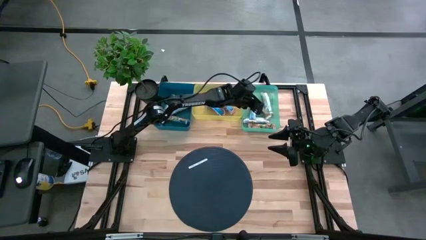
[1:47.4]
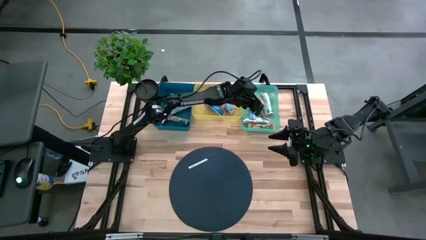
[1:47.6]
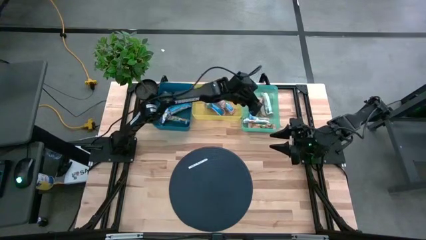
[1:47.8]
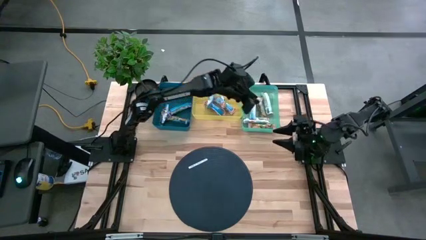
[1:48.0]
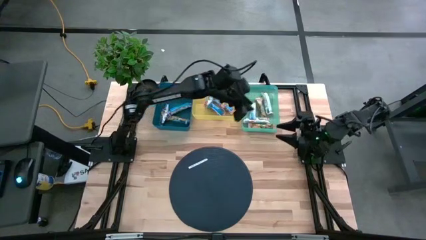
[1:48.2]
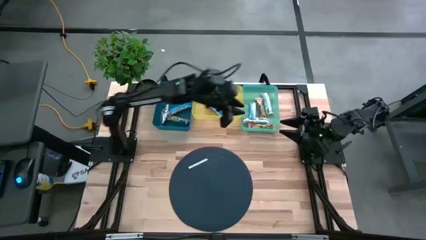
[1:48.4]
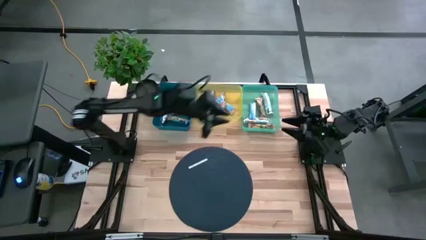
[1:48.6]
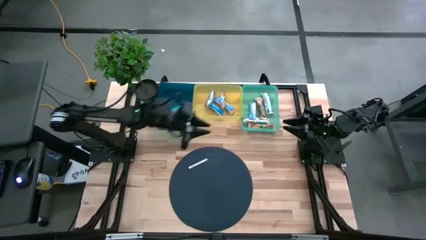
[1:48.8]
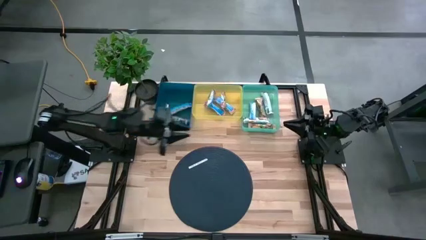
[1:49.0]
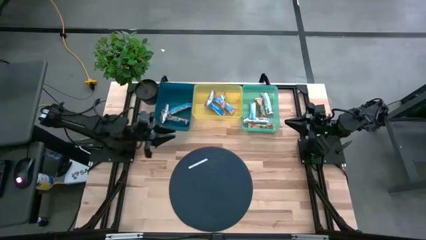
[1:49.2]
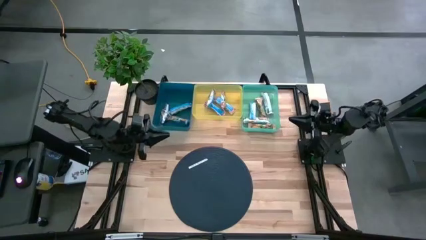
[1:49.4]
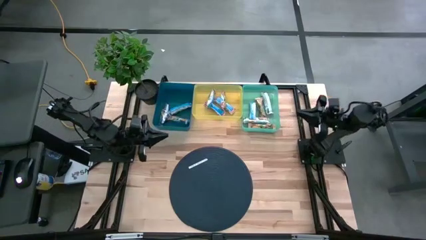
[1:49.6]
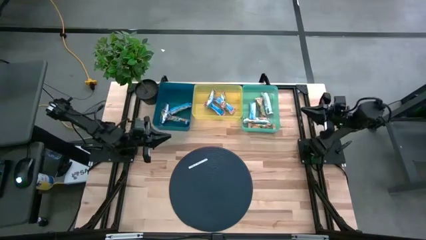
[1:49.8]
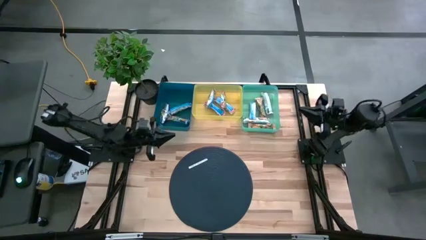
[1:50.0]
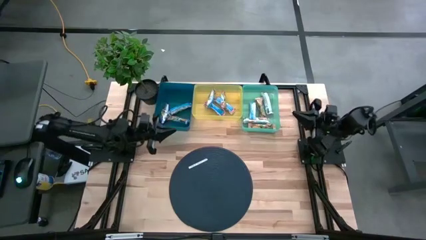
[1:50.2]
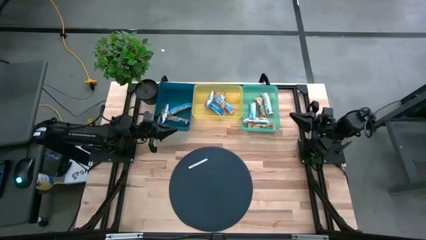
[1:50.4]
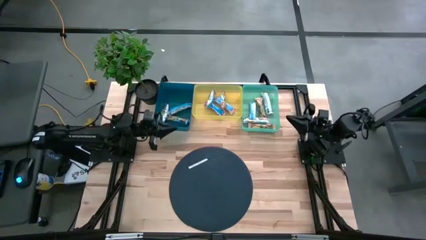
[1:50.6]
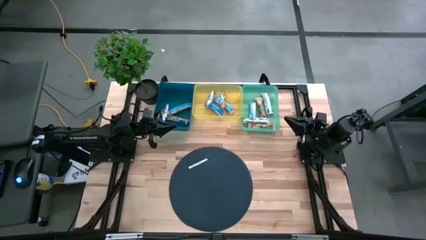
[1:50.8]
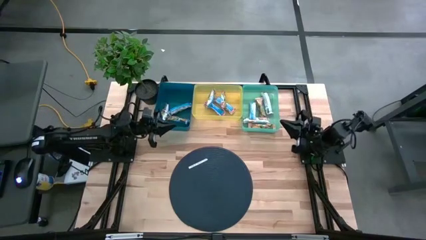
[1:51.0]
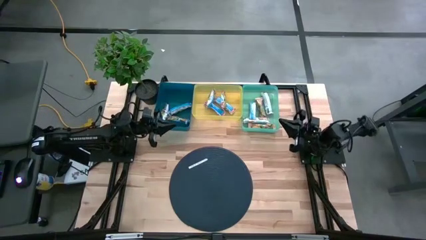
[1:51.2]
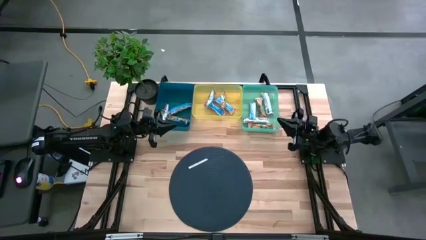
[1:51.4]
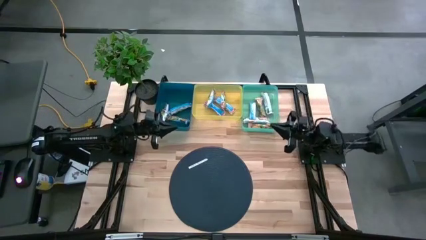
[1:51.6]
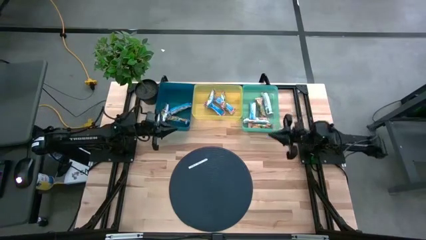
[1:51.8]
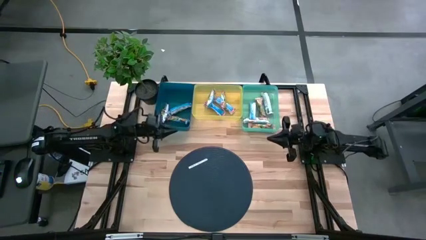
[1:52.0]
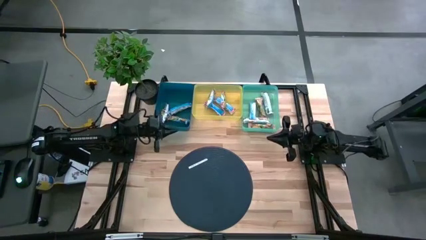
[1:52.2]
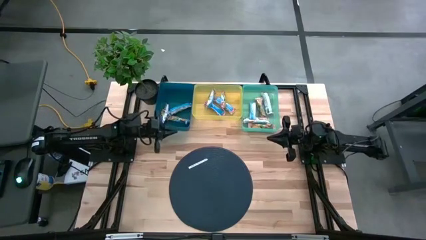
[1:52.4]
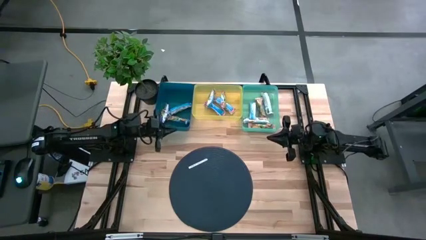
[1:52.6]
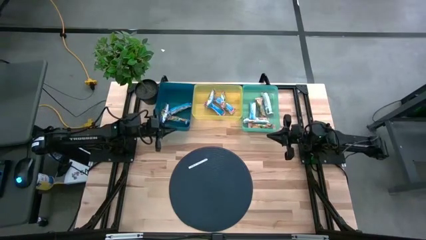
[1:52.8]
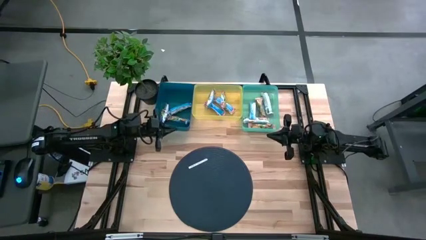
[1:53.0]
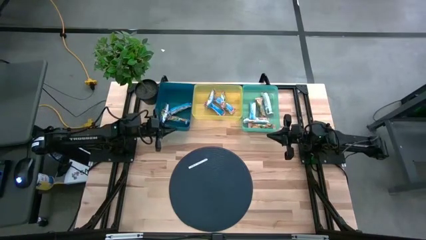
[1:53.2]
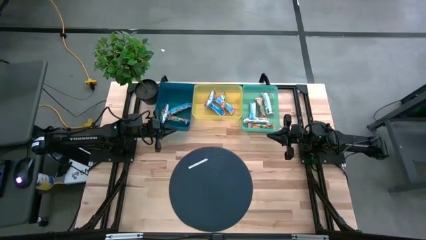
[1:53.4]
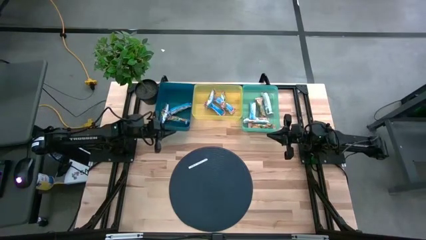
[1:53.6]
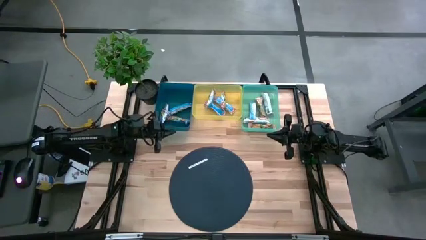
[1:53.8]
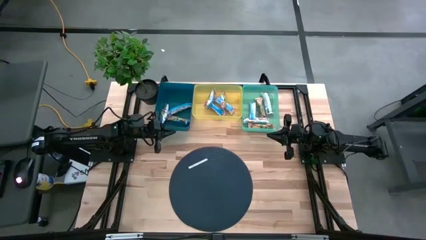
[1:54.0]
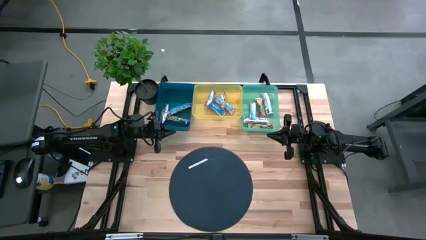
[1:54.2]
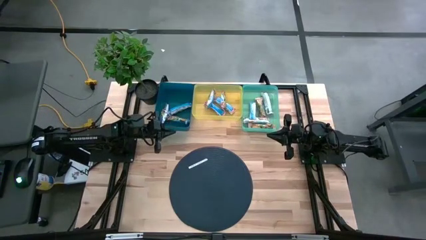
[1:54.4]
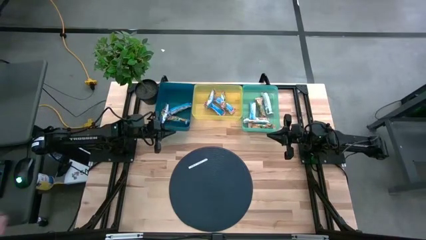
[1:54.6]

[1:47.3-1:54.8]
Task: Pick and place Granola Bars by type
Return to Home Position

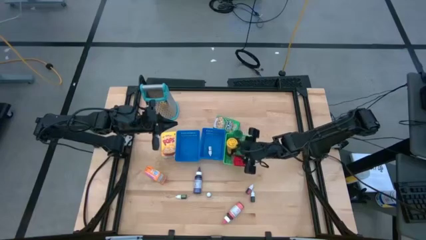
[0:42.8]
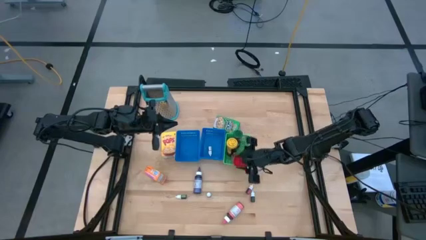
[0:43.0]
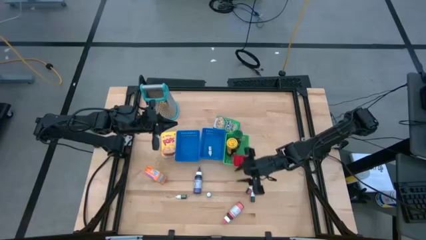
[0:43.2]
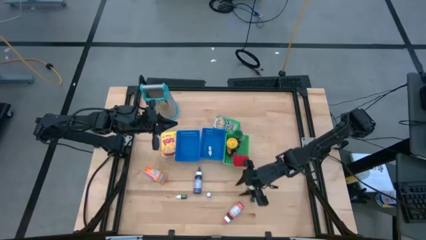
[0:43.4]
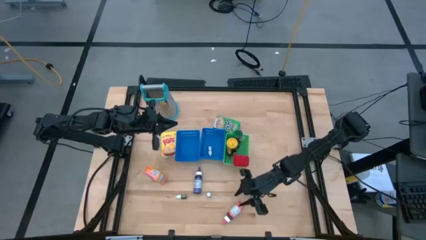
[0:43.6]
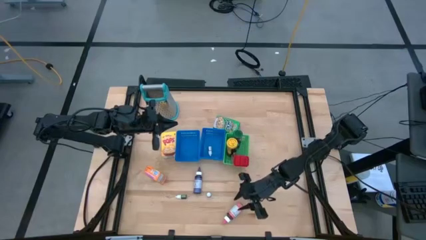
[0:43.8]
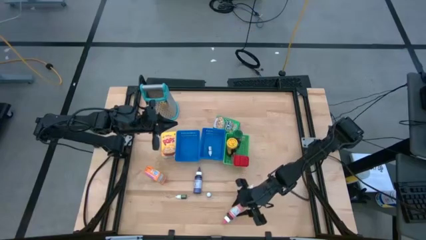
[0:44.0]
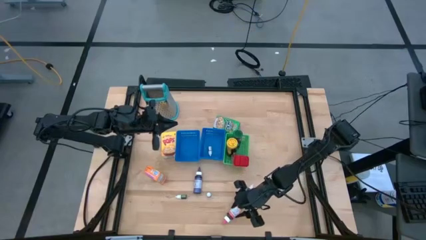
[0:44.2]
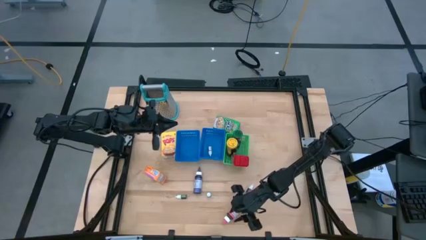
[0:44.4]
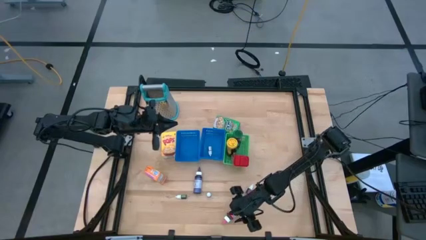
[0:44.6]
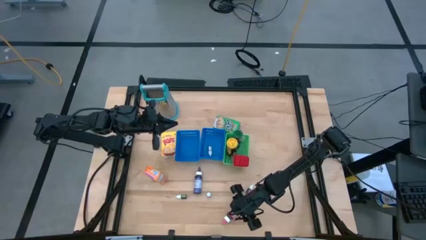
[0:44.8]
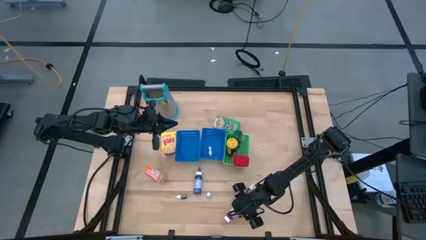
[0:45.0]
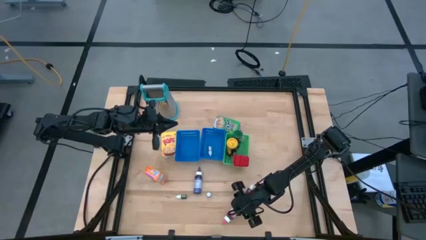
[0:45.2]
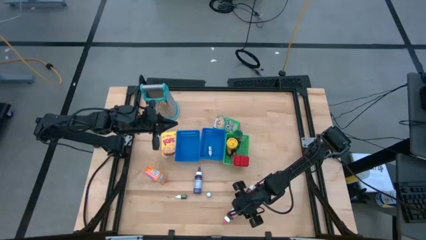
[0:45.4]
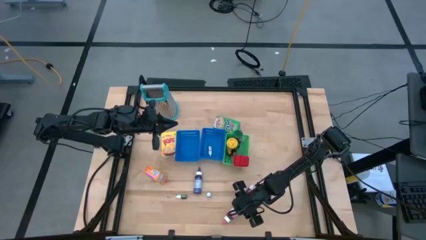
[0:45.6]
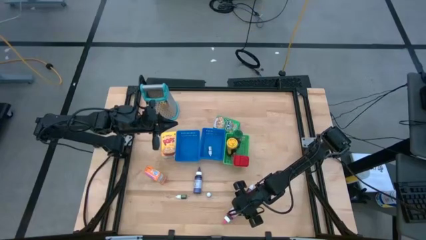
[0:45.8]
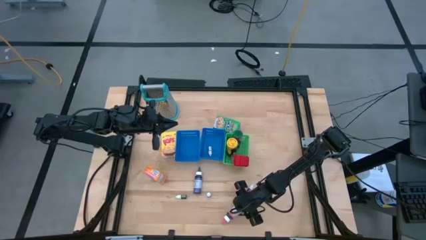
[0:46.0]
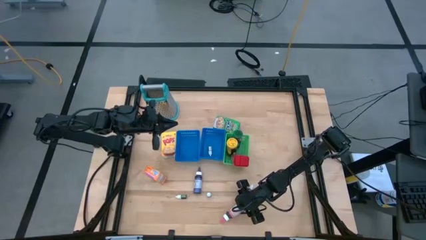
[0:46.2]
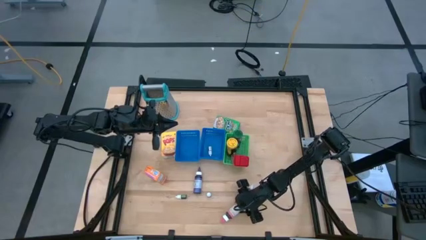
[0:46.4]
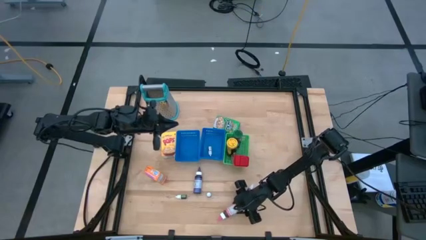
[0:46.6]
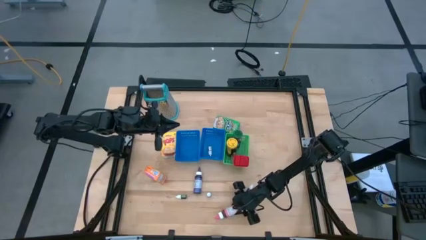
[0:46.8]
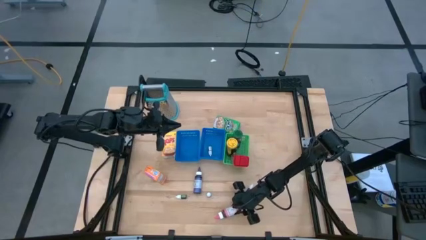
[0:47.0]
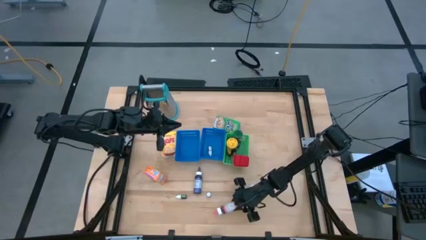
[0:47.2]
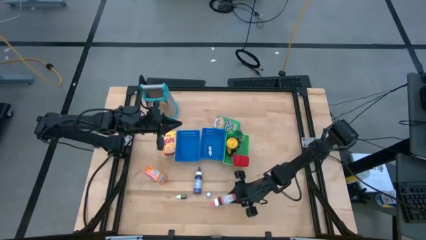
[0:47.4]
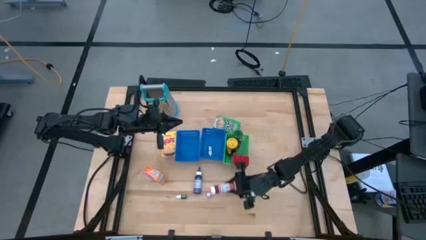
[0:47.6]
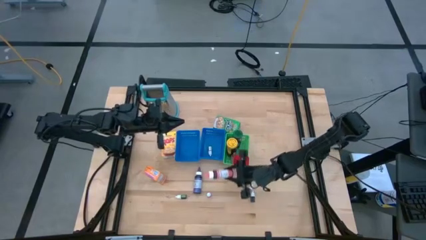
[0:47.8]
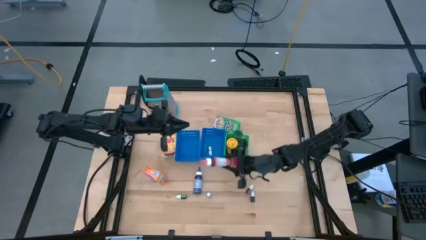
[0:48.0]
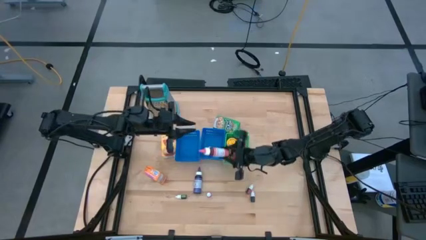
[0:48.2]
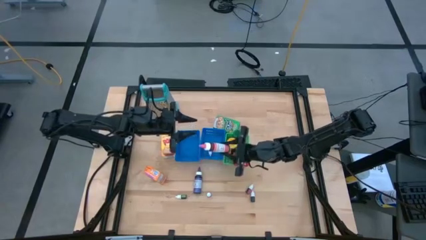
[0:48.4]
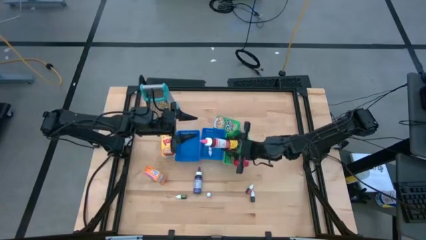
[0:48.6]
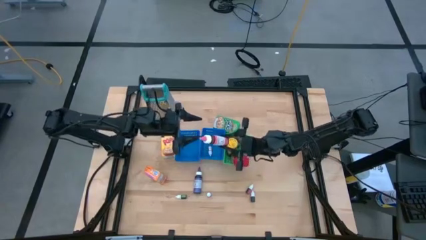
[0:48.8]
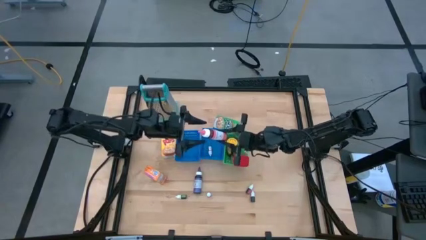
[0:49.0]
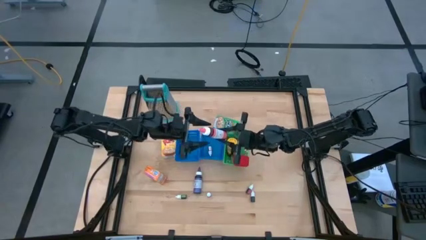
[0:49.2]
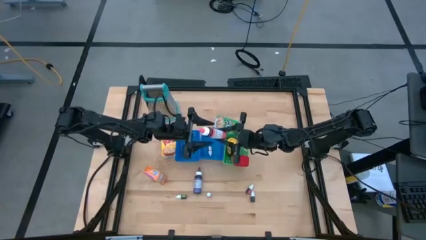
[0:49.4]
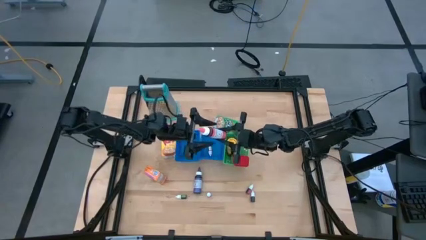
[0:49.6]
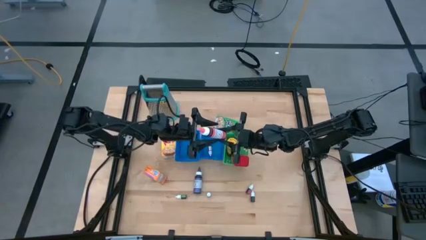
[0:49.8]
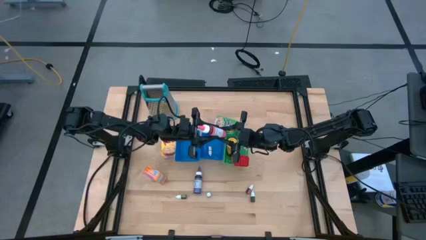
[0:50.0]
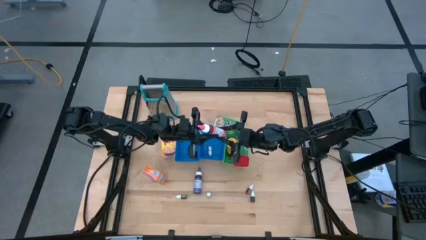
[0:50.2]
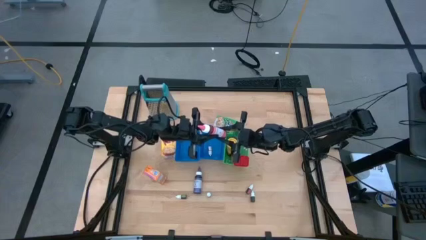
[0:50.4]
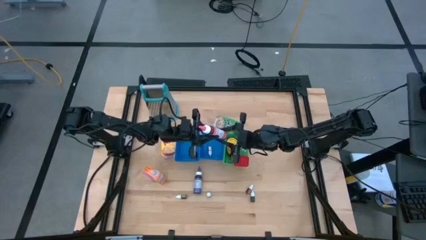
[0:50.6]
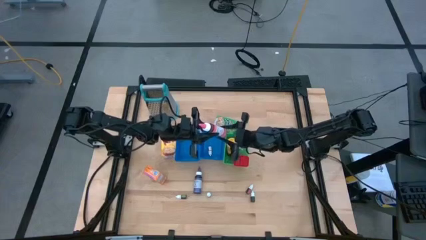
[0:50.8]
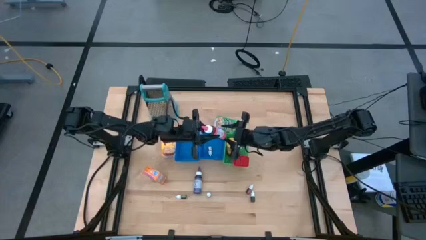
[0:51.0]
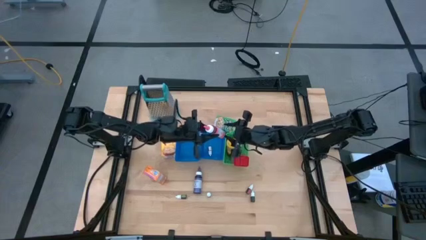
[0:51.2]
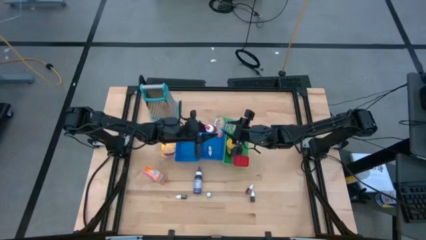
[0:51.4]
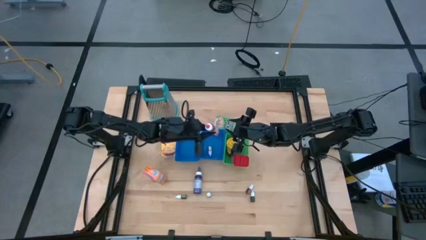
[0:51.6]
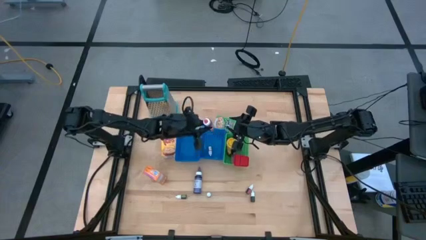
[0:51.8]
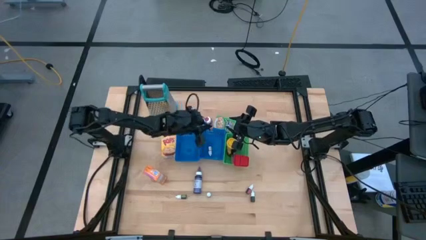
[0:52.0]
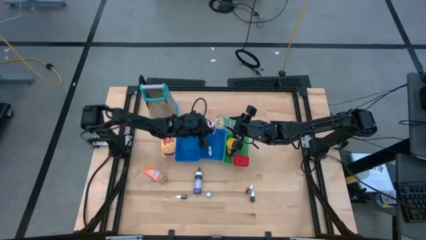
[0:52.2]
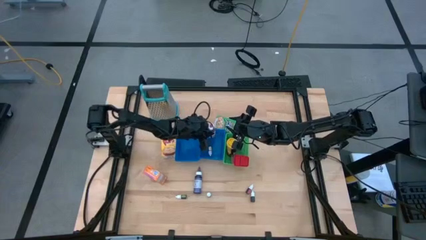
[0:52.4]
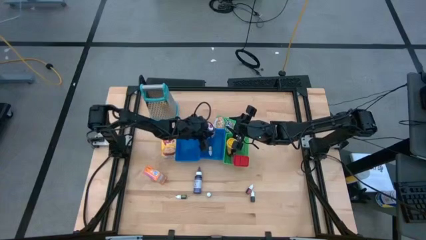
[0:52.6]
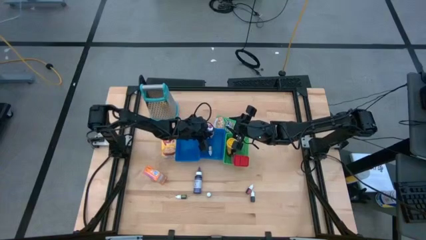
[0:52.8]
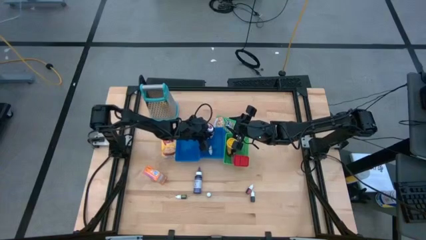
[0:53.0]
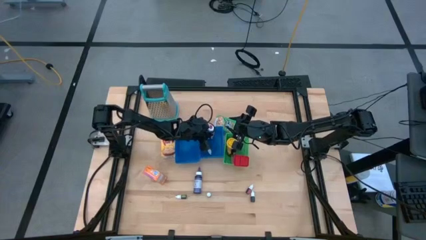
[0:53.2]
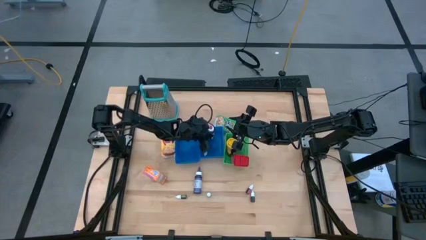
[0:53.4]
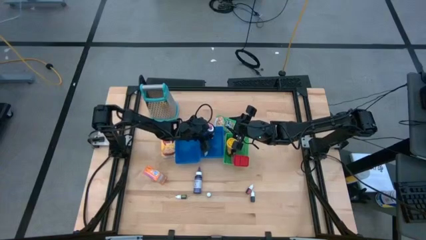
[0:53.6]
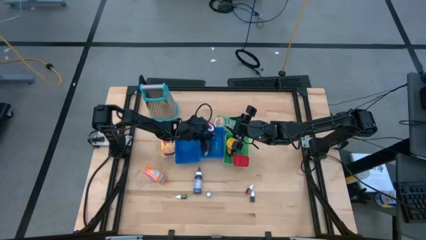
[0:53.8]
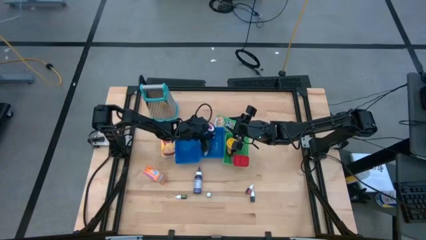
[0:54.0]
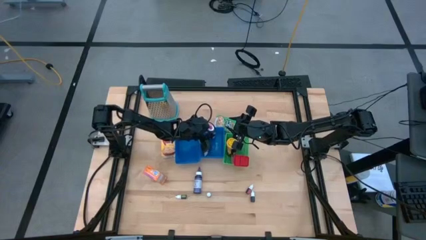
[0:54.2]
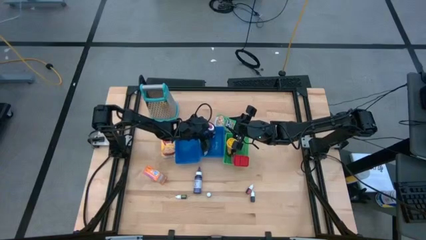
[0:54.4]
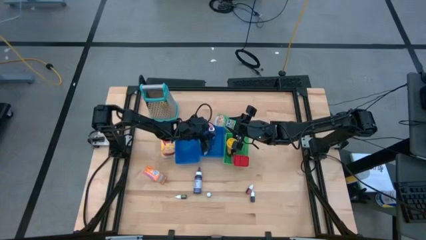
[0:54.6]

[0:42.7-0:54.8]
Task: Pick & Place Kitchen Items
Put the large pink food coloring bottle into the right blue bin
